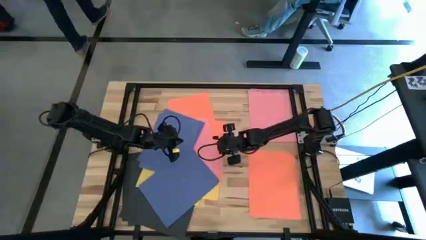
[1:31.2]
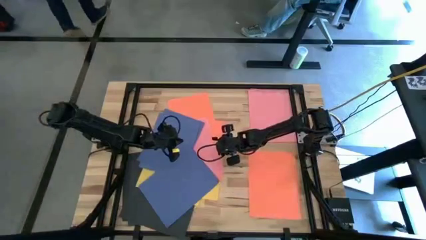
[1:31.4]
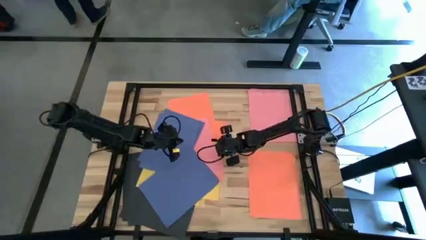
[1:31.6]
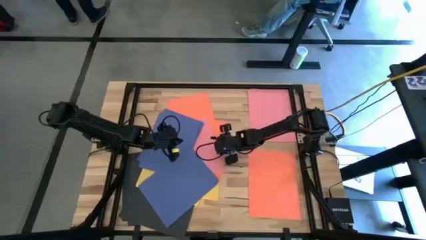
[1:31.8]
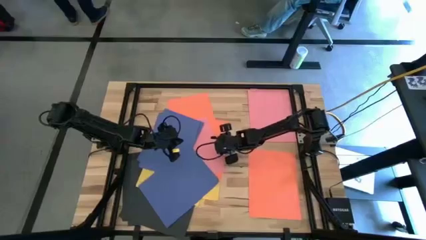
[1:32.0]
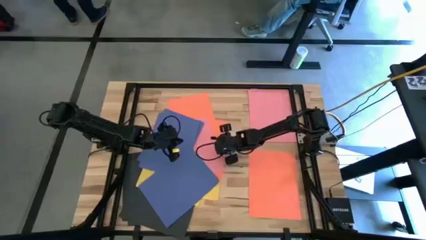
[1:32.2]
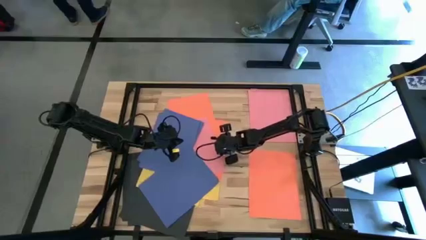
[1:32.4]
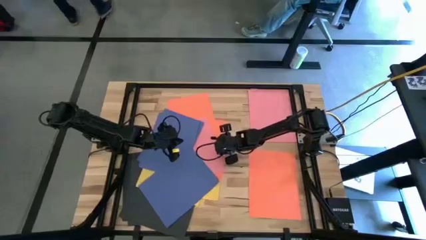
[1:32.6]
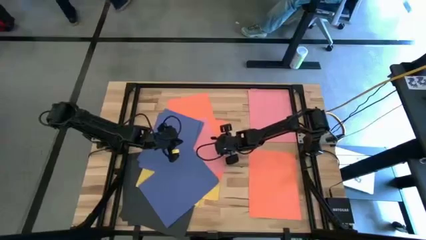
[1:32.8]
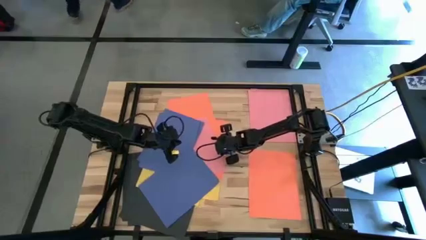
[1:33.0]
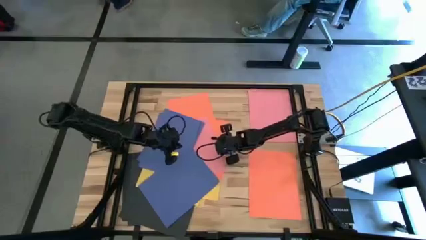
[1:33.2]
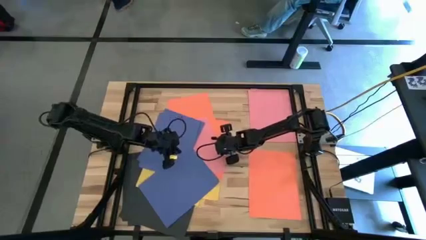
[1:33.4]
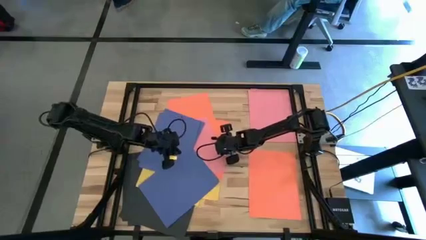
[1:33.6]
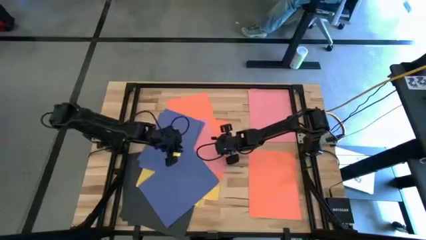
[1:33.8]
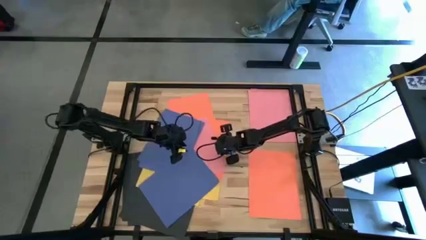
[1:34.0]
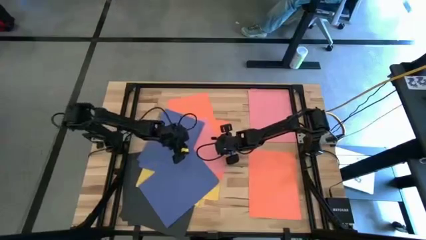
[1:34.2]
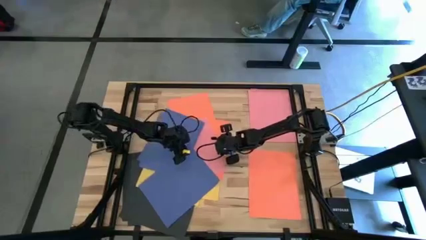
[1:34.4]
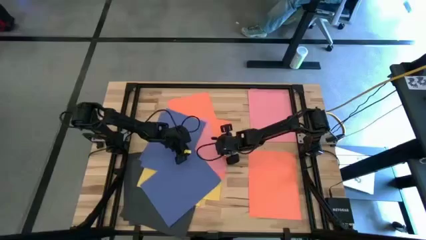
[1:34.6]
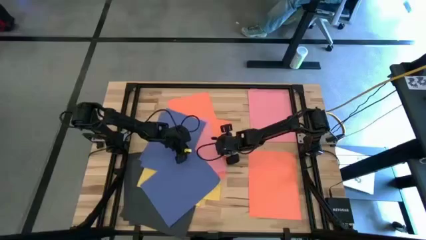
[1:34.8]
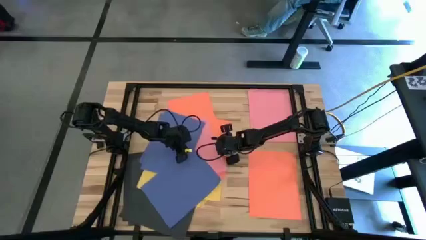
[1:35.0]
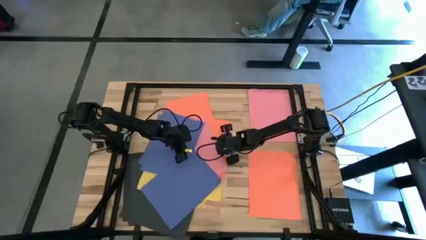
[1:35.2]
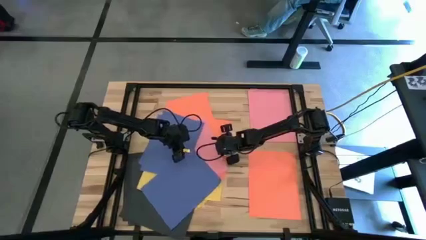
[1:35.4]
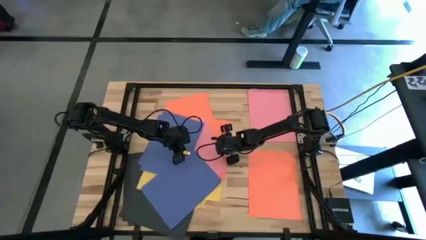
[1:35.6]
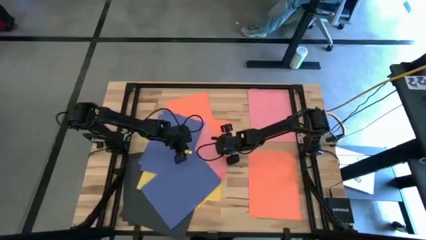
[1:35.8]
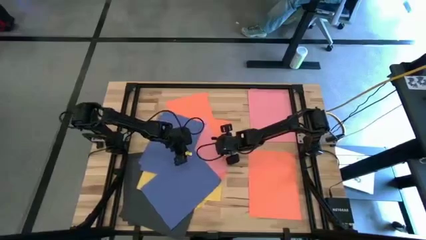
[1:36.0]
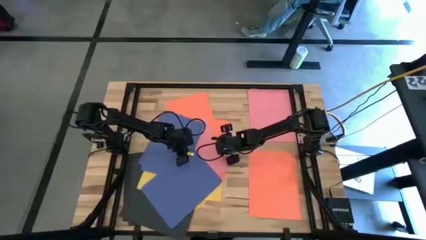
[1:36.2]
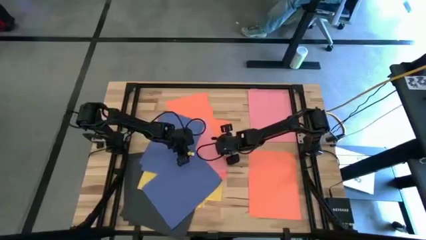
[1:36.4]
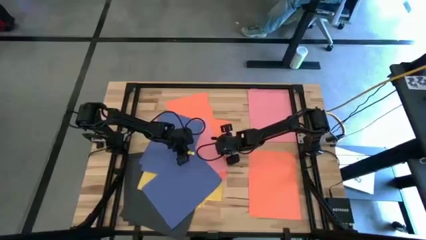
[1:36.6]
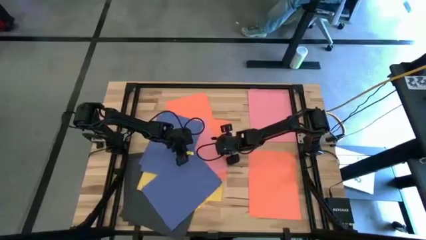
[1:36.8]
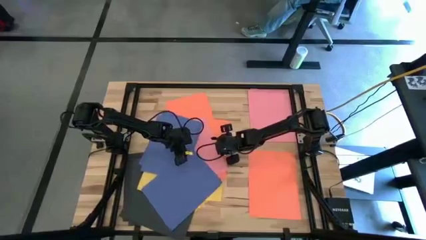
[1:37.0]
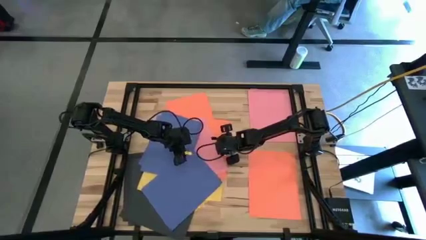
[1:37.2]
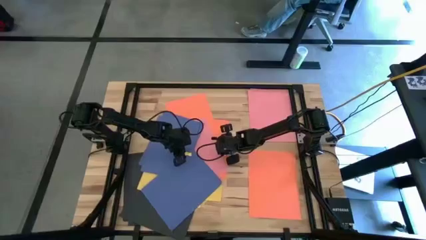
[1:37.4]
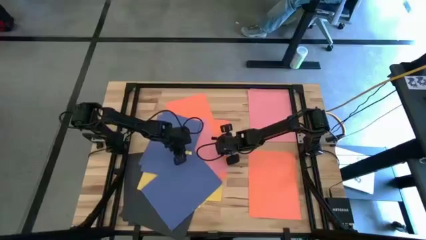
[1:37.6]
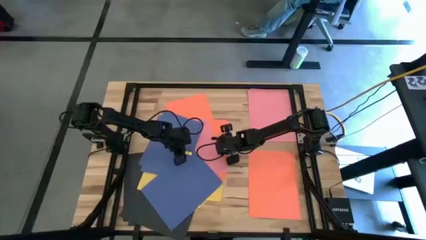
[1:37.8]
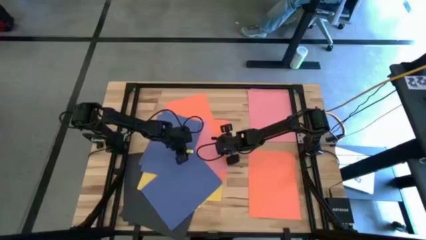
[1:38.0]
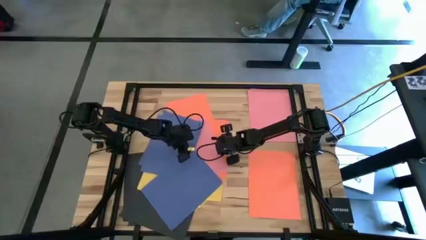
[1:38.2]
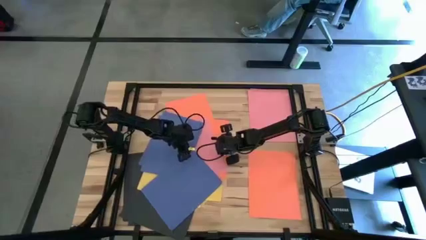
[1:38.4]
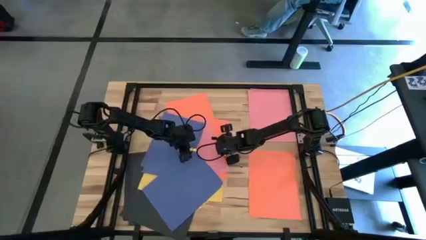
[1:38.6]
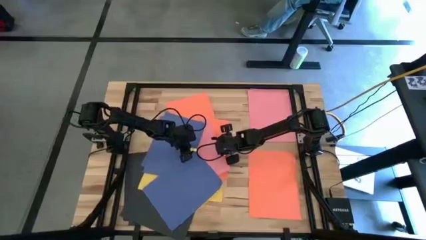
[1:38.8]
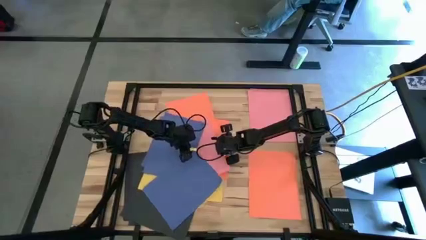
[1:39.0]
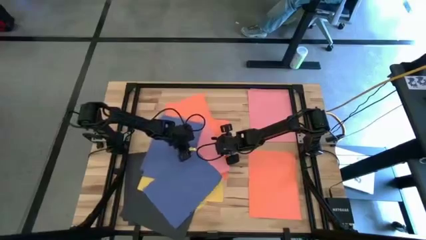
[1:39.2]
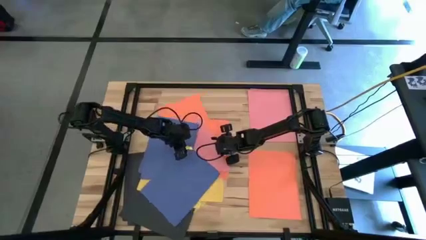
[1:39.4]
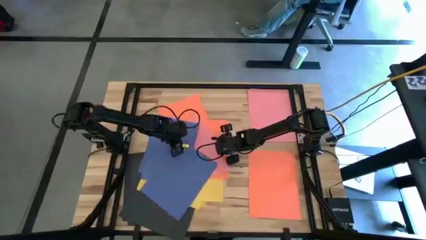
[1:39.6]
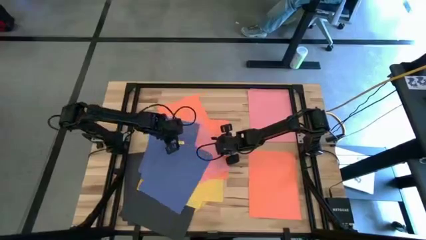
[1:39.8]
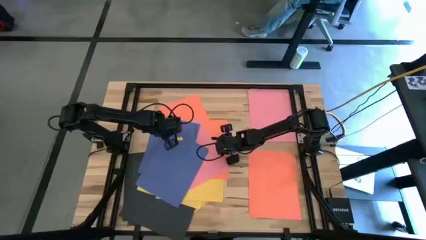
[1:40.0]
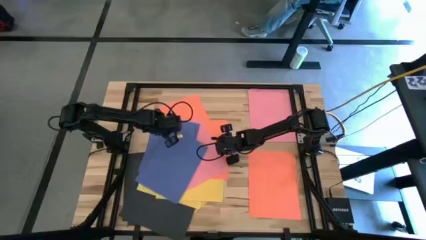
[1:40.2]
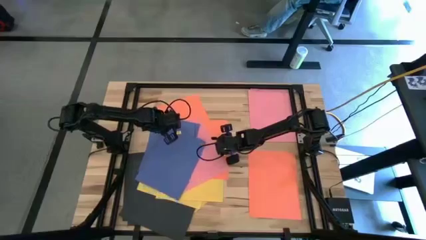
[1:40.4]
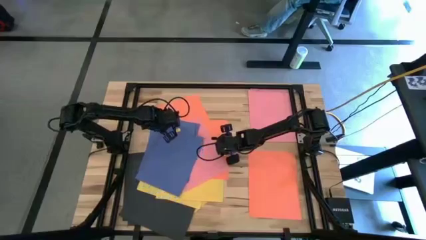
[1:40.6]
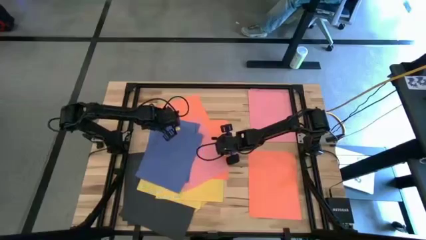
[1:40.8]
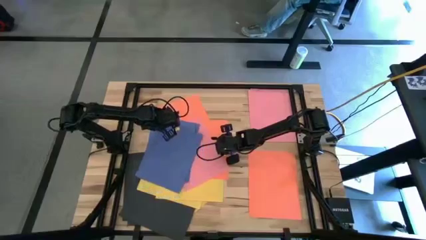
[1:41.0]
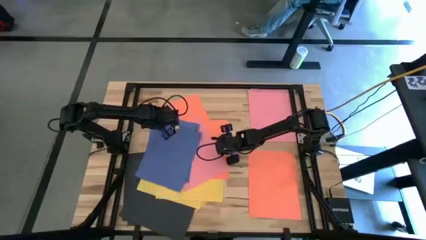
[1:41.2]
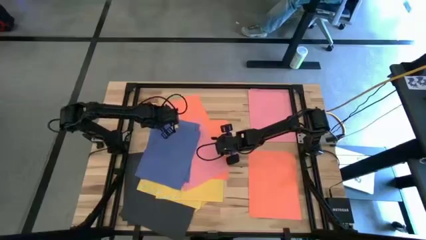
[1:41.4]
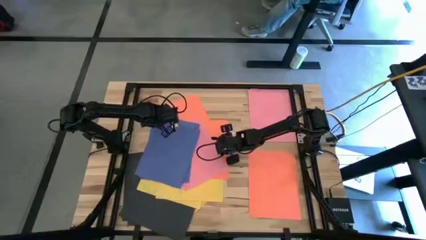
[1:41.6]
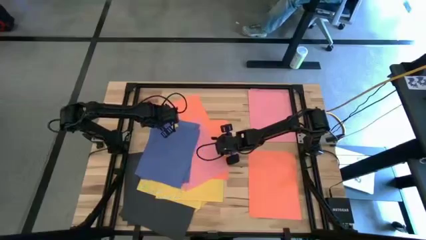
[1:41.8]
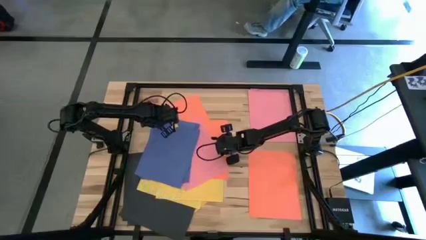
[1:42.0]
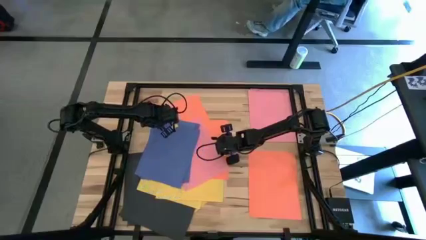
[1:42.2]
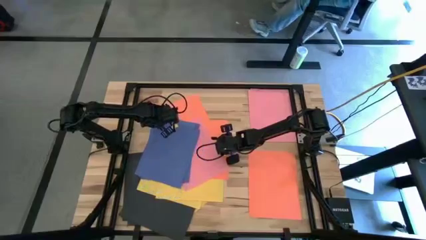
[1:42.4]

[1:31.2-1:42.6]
Task: Organize paper
Put the orange paper to the bottom right of the table

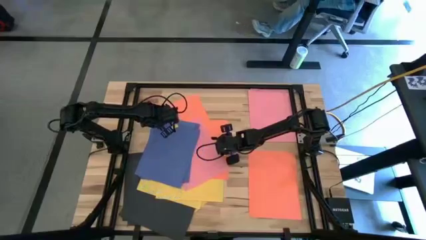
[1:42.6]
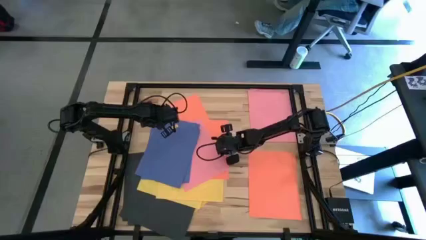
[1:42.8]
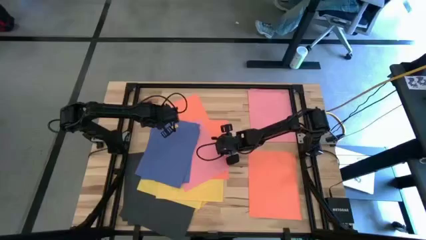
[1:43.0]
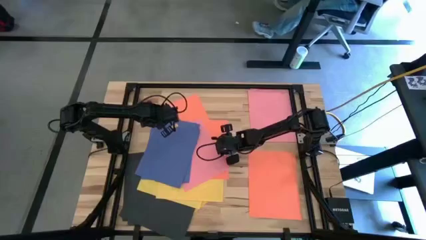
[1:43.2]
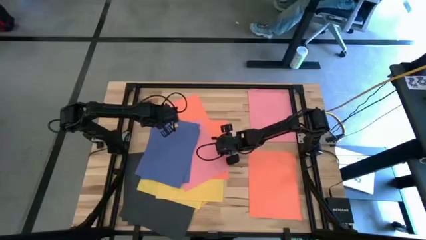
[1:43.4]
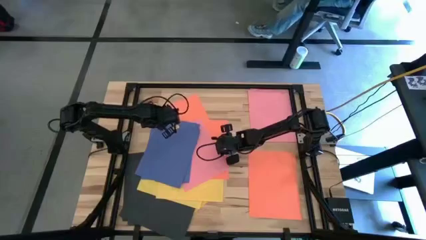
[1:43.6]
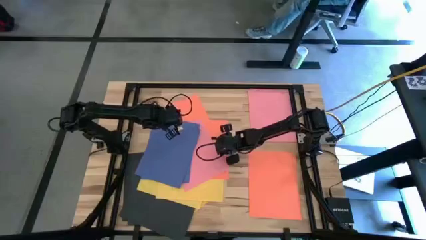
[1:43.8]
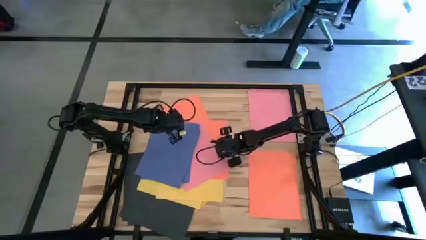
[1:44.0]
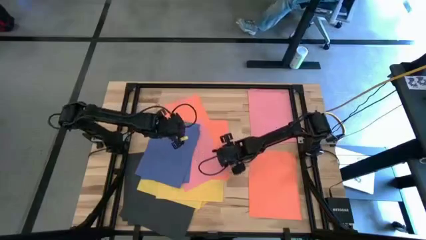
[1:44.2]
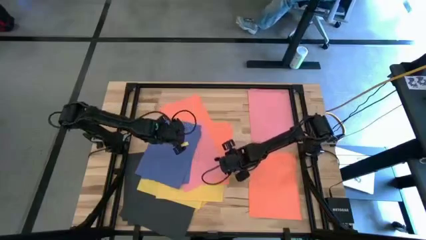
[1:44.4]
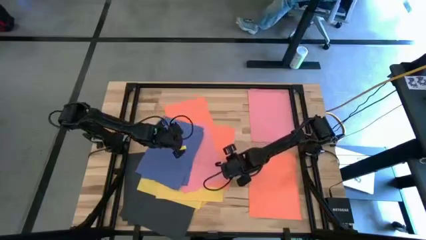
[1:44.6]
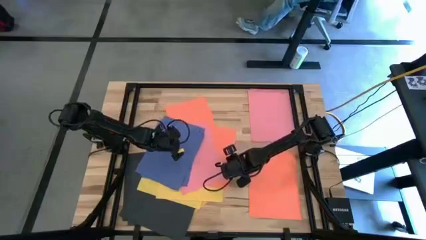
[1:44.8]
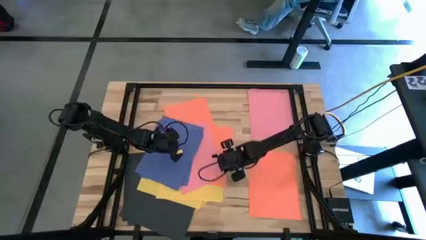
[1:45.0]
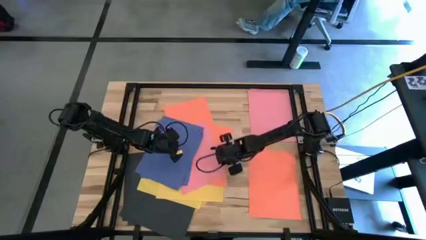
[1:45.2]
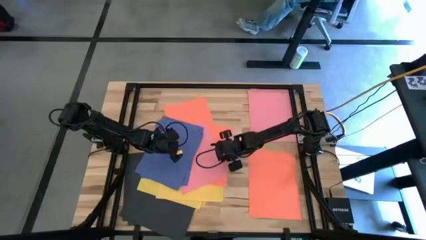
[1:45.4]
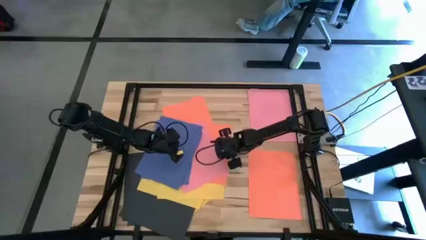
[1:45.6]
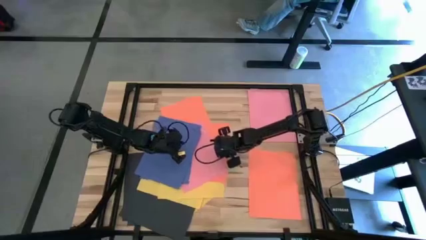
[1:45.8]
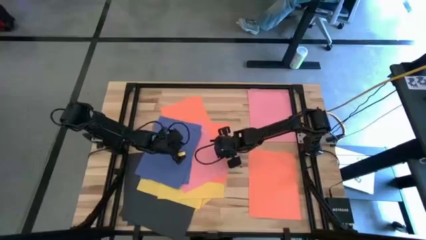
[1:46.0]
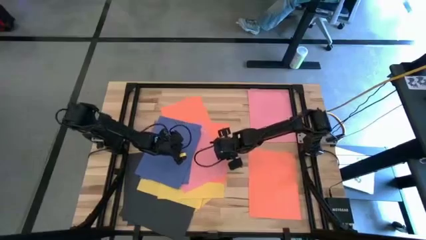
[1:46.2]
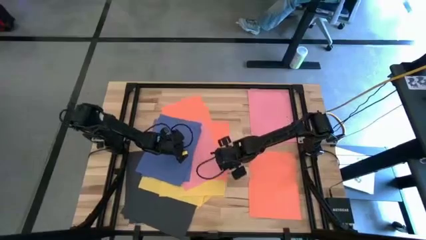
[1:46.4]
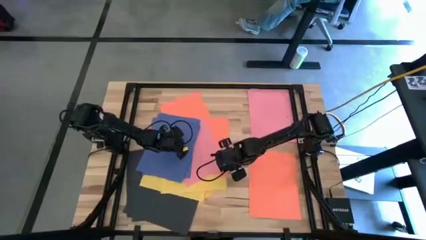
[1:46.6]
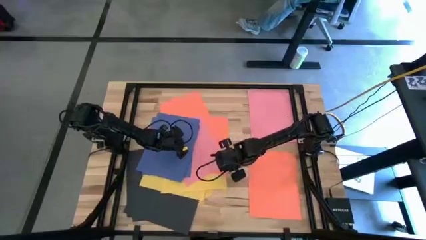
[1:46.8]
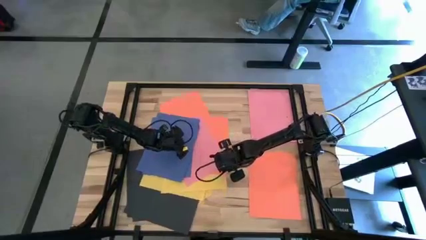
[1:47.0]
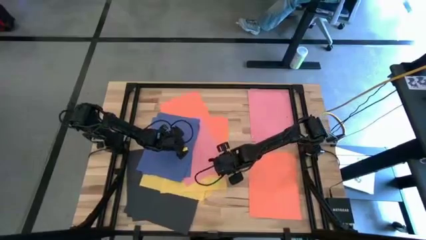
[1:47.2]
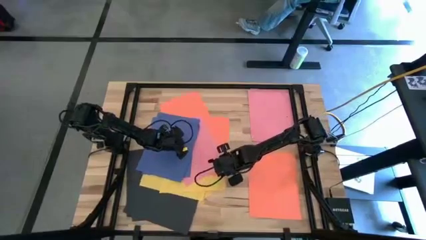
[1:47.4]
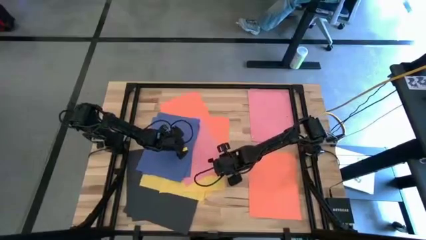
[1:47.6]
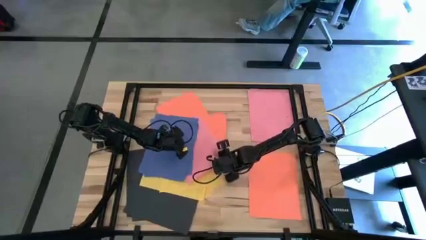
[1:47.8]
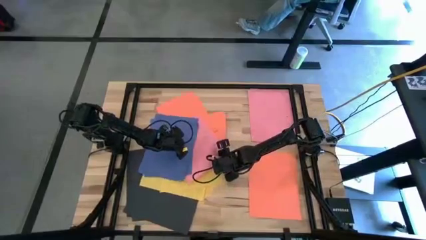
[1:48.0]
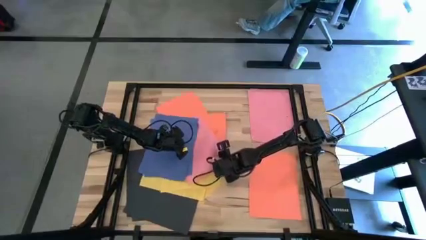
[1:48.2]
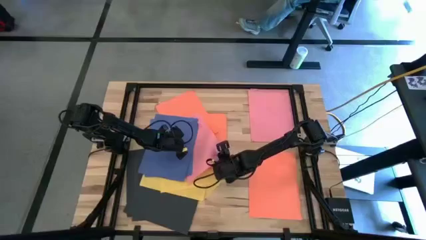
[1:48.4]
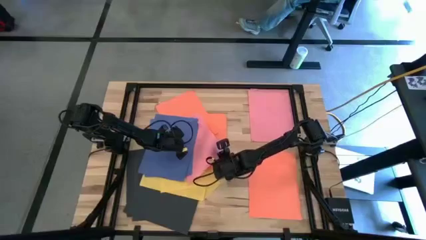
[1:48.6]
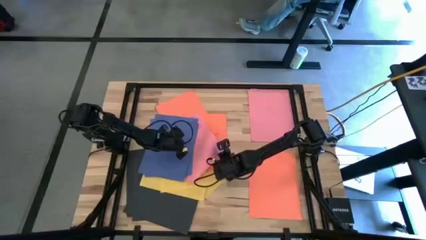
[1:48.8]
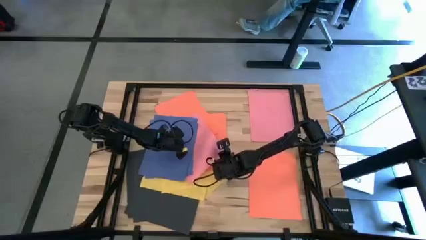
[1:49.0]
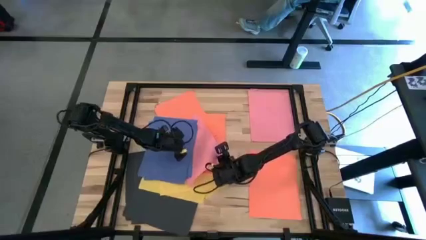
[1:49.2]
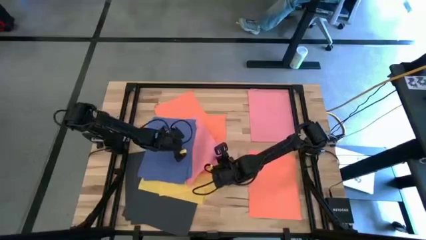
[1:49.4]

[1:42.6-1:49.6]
Stack the pink paper on top of the pink paper
